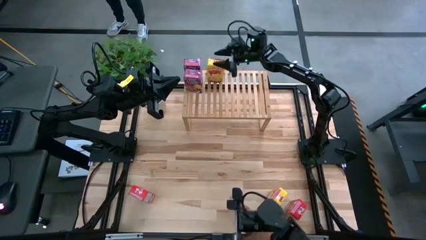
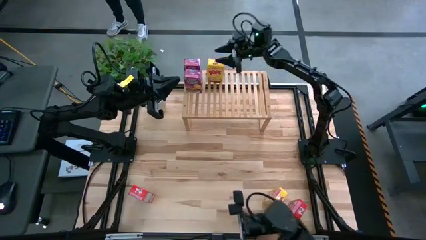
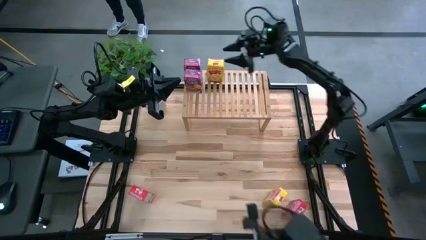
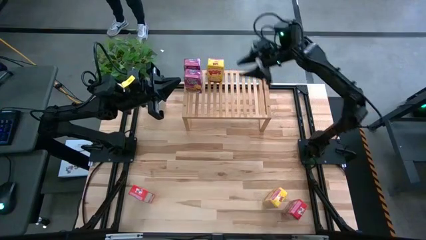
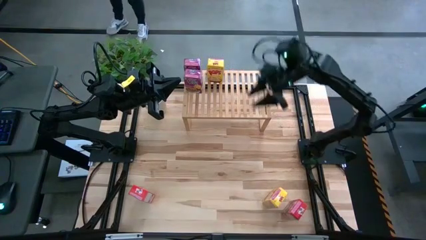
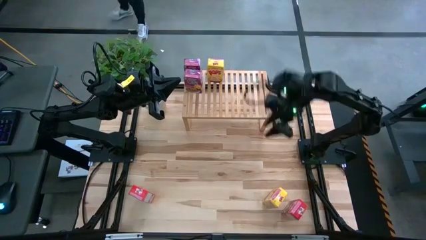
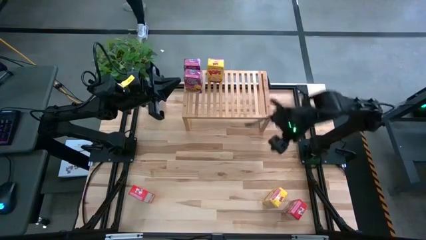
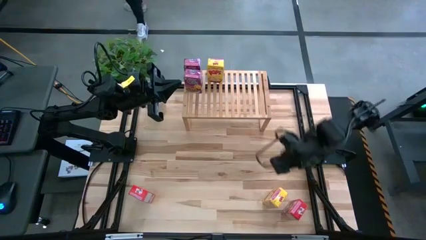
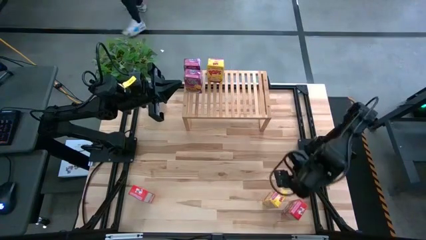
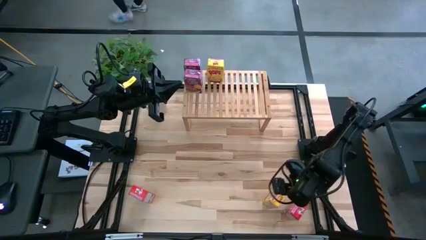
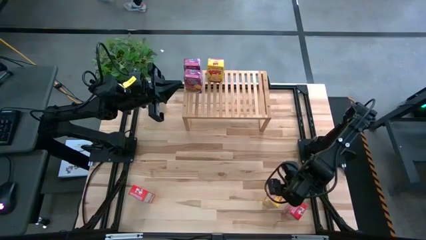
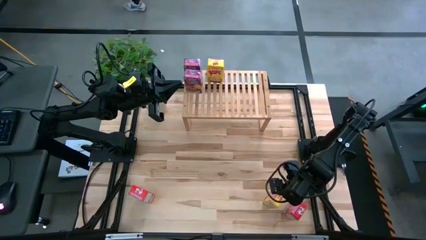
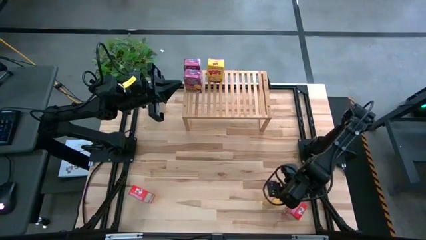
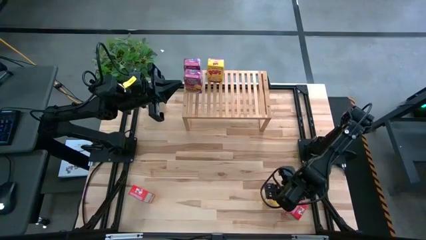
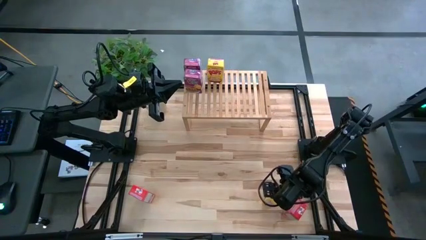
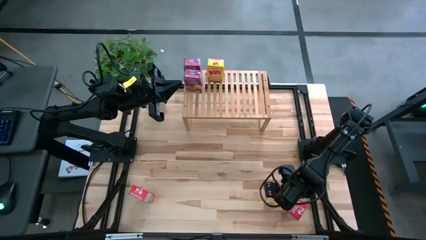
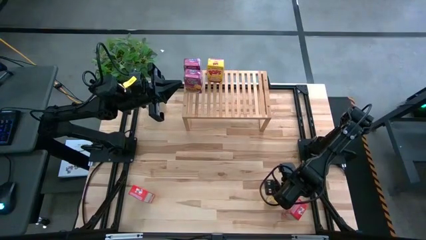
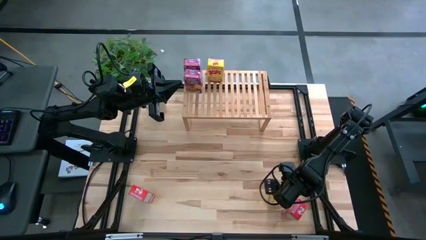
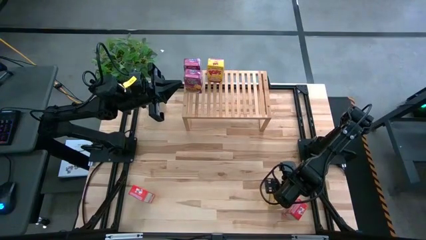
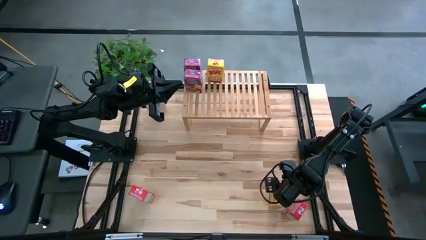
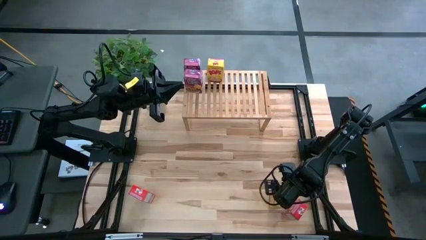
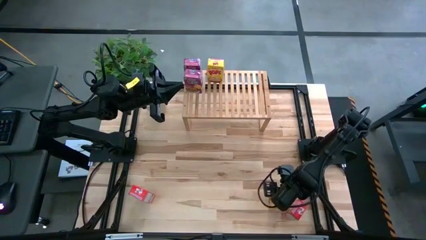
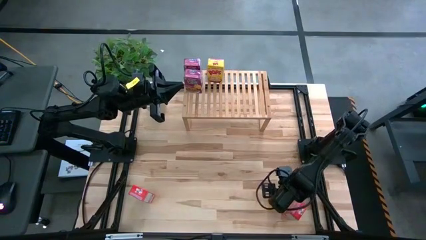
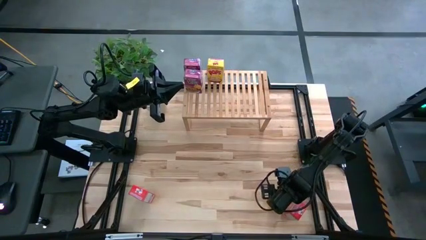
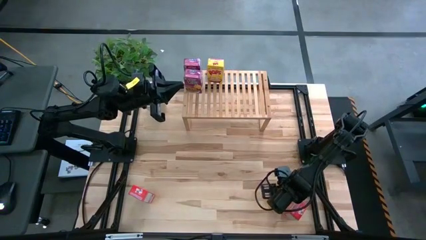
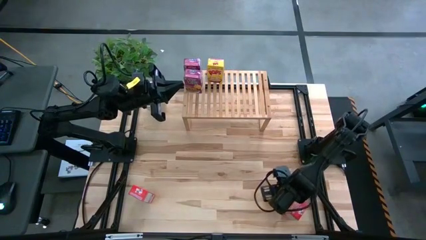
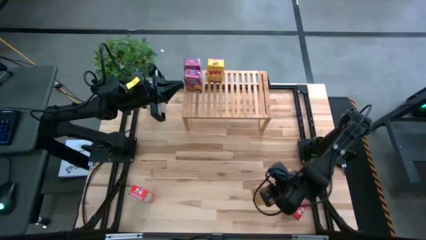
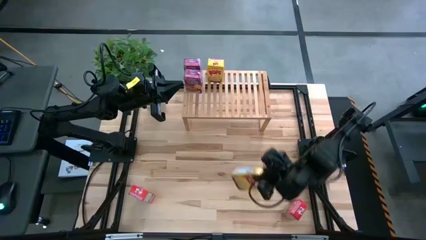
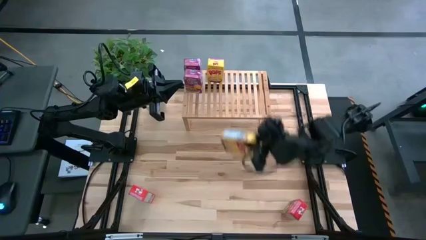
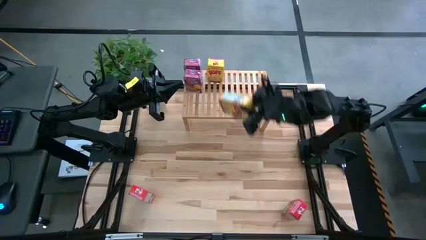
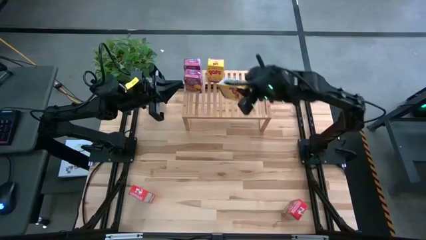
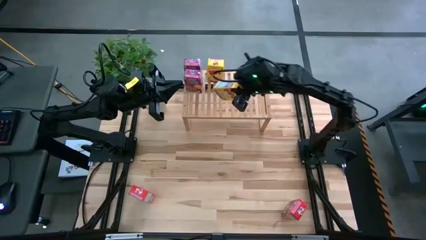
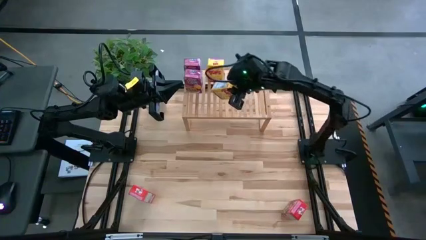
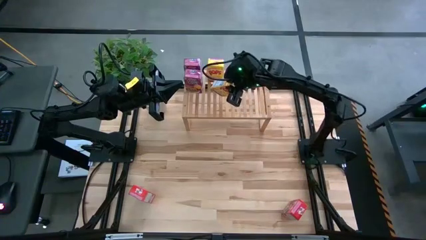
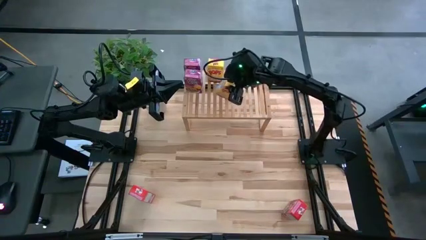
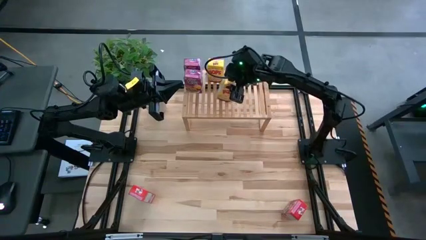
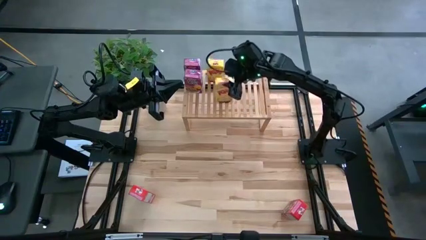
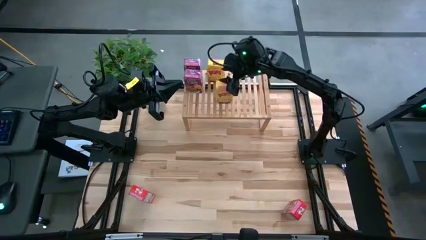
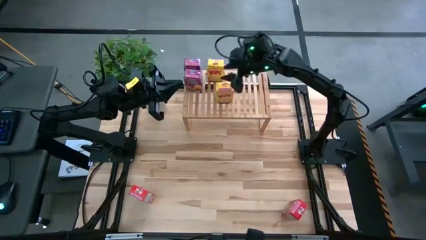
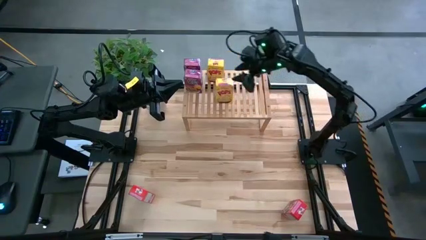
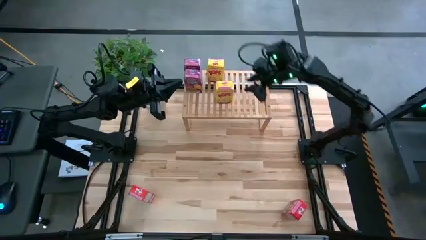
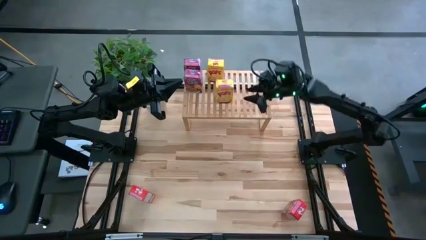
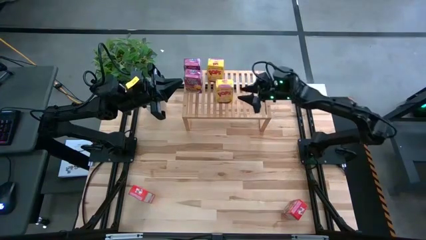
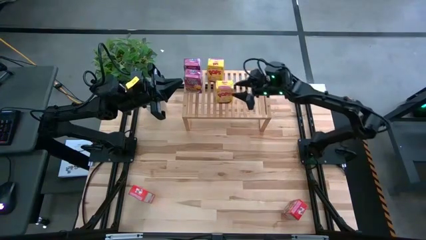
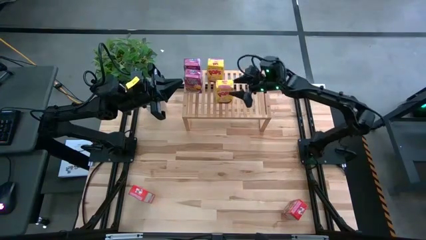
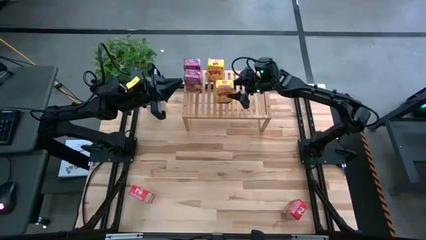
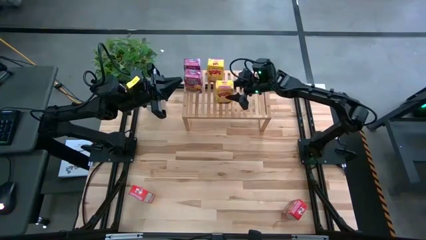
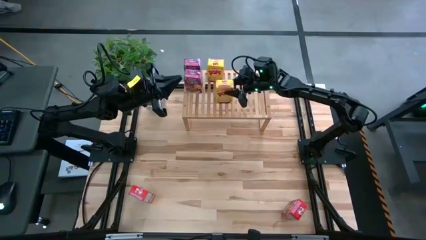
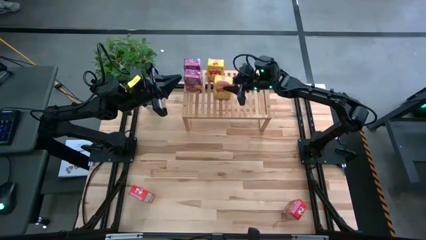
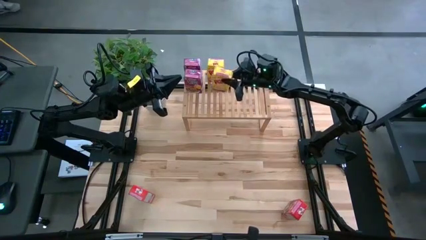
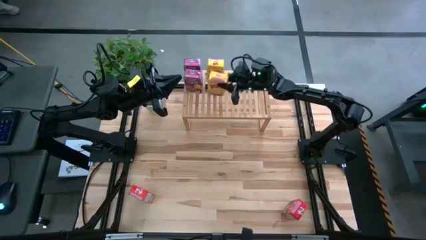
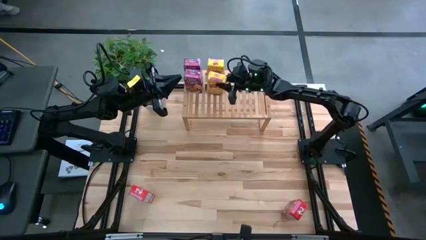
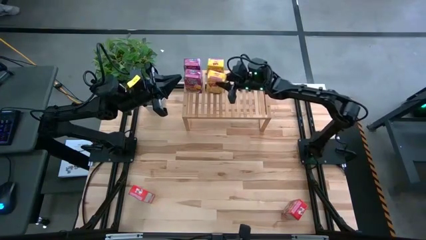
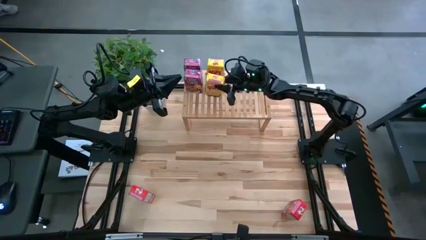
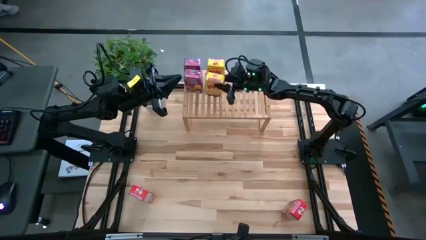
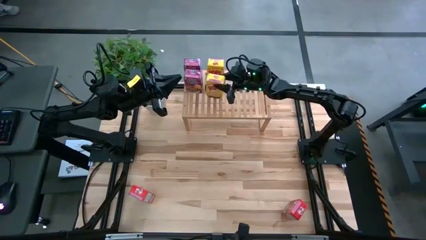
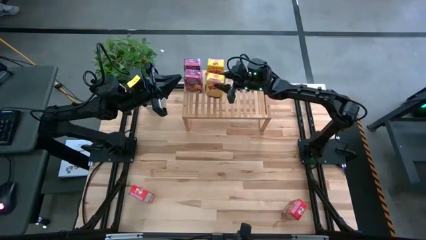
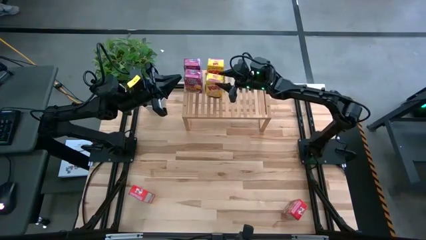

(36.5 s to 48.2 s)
Task: Stack cereal on shelf
Put the yellow cereal box aligned with the other yellow cereal box on the shelf

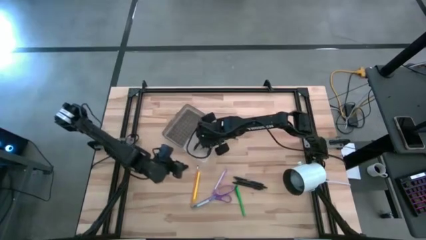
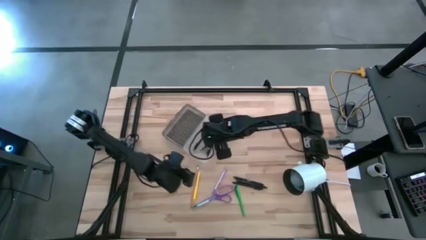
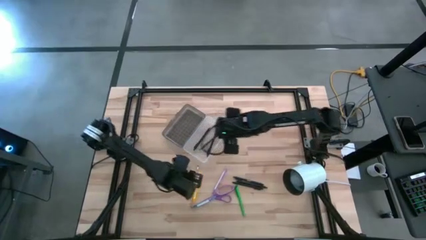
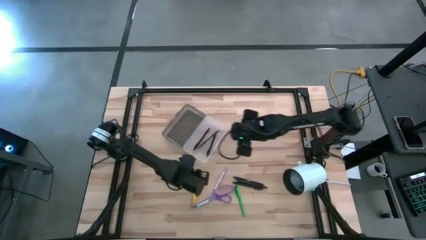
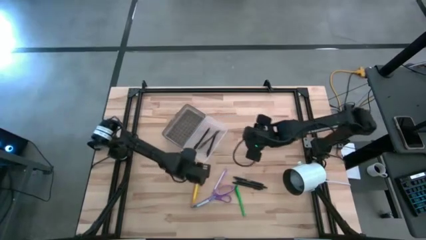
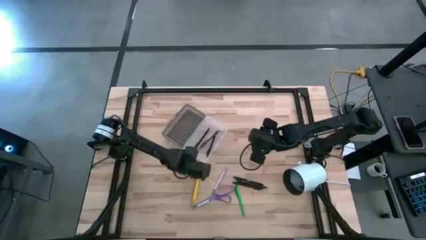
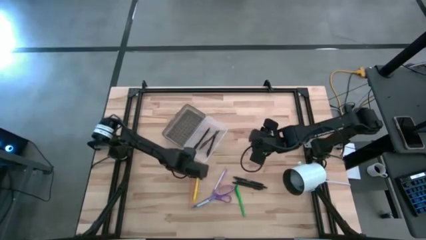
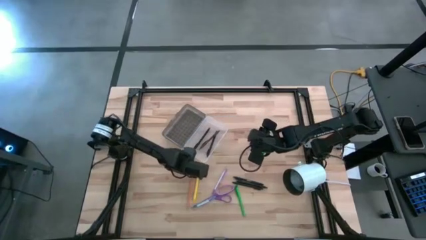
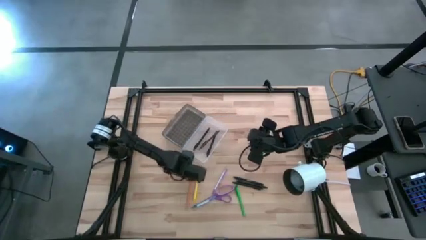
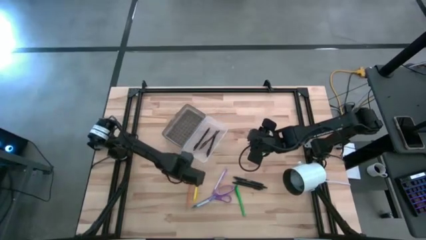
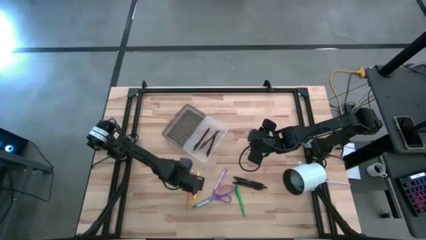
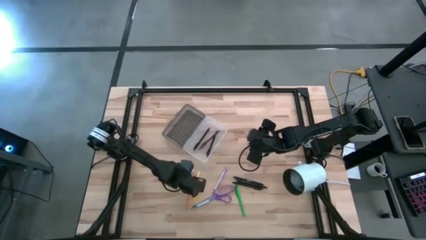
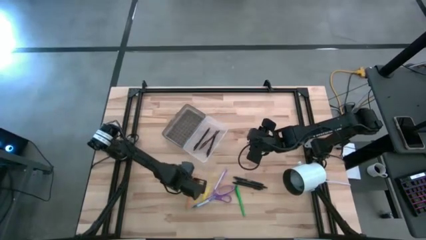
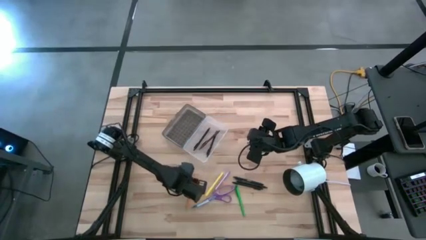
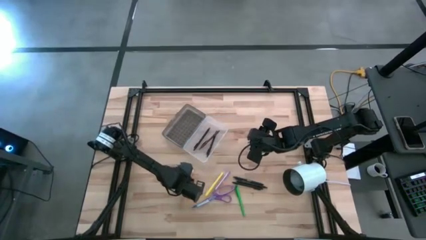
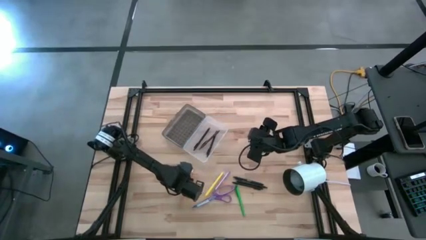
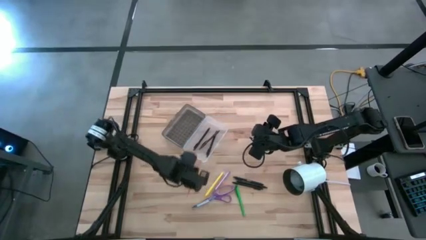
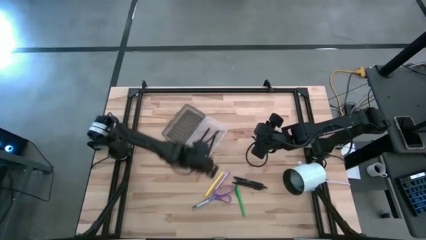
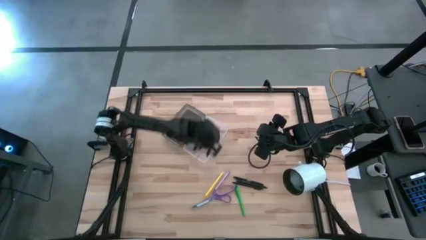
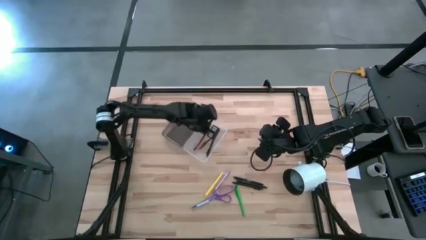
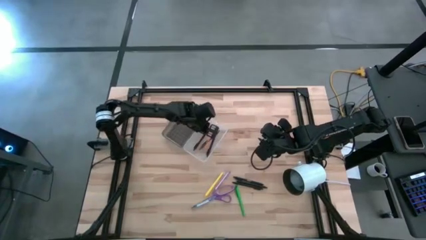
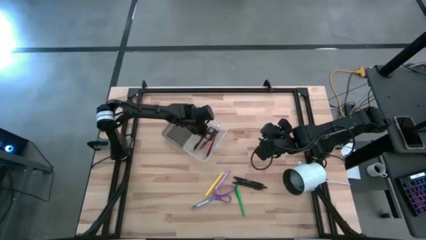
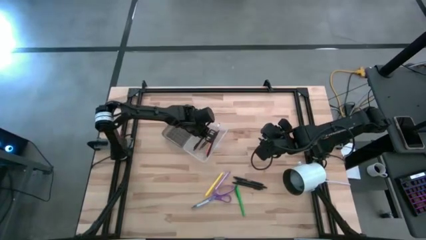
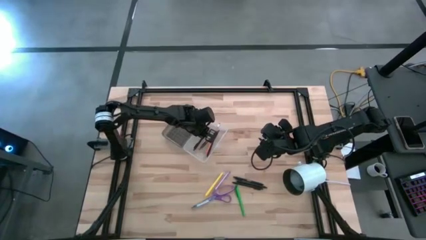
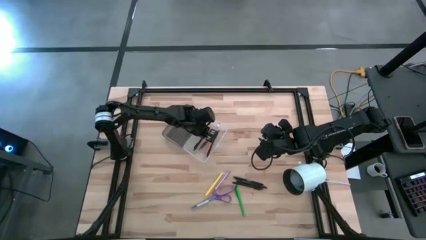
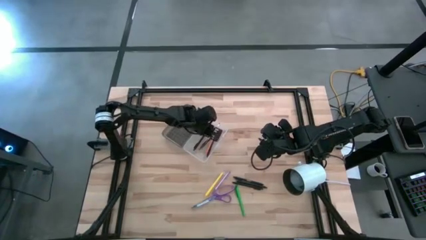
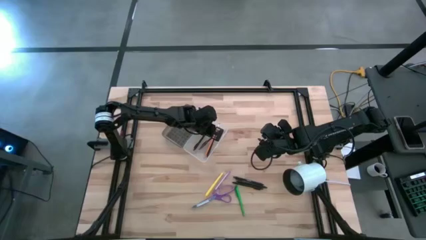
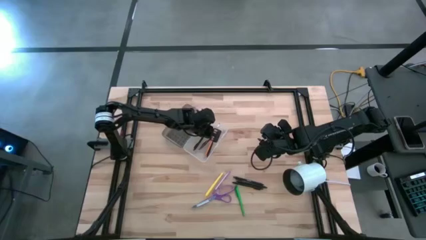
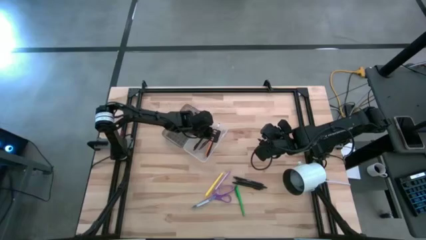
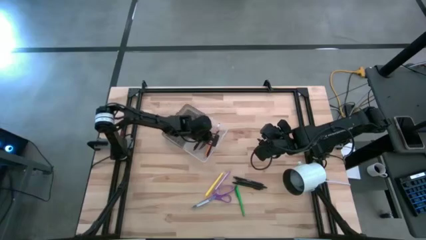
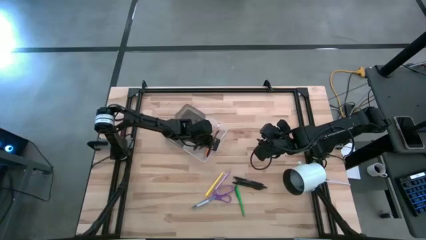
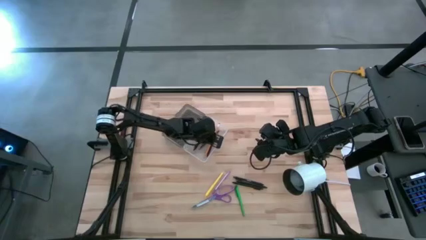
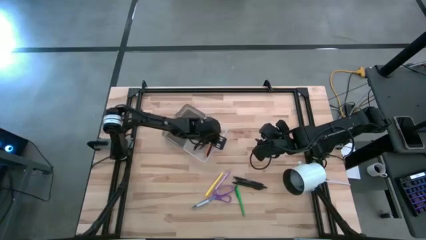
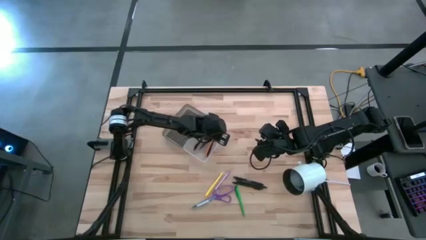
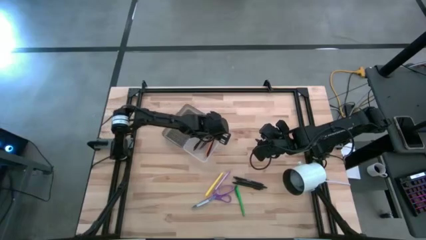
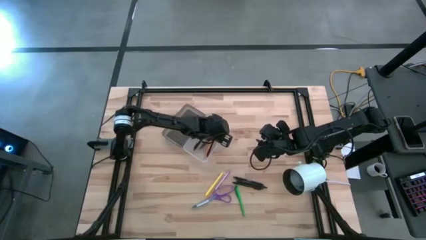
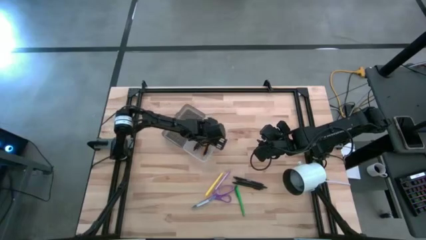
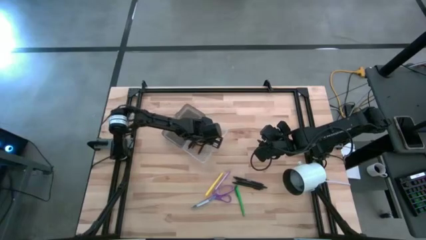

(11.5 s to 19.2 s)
Task: Pick & place school supplies into a supply box
Put the orange pencil into the black supply box
